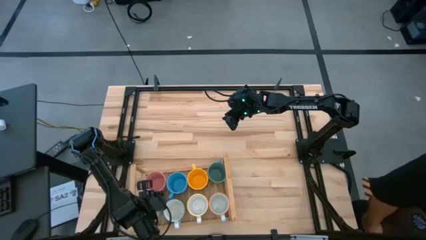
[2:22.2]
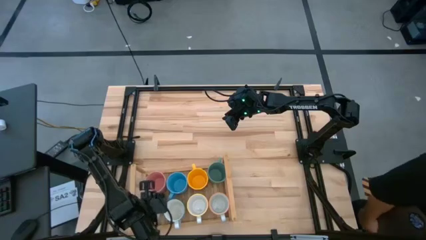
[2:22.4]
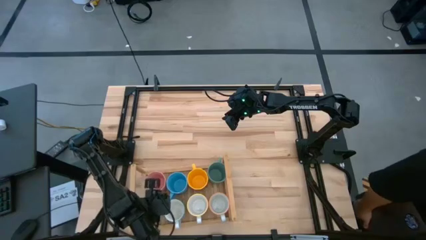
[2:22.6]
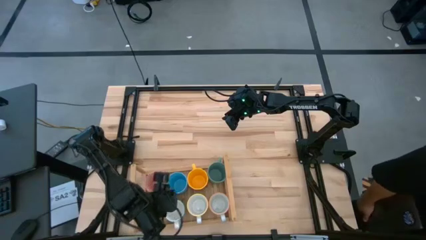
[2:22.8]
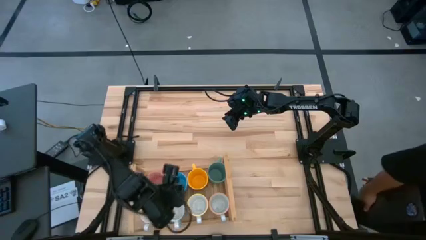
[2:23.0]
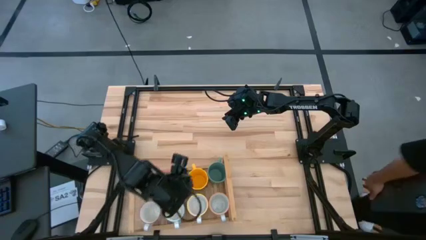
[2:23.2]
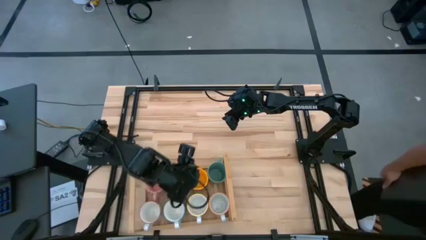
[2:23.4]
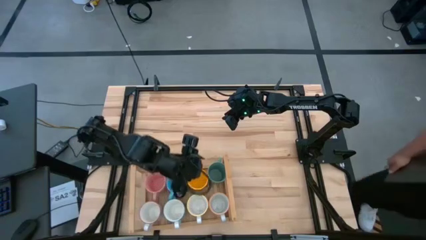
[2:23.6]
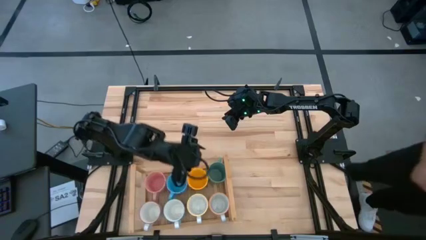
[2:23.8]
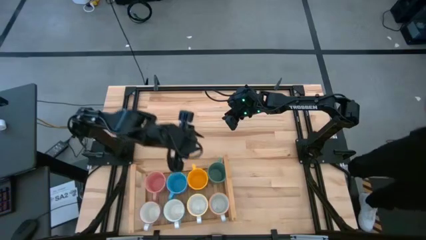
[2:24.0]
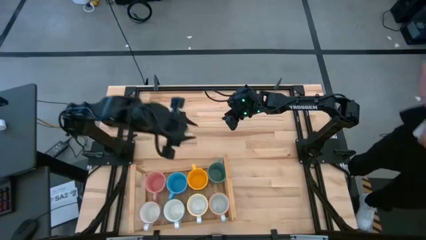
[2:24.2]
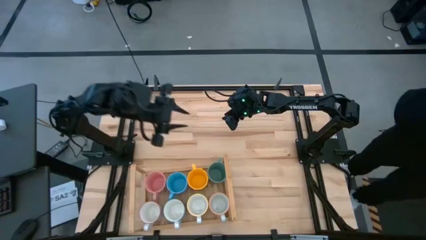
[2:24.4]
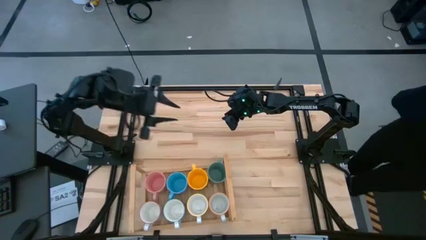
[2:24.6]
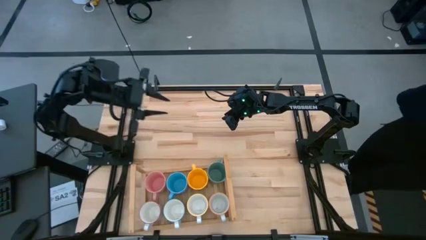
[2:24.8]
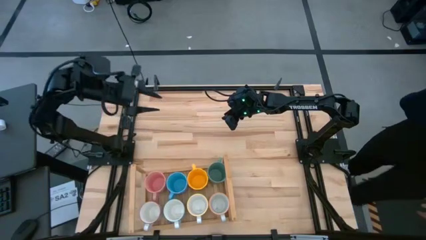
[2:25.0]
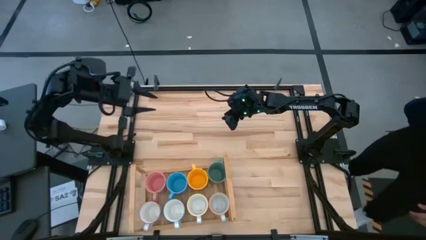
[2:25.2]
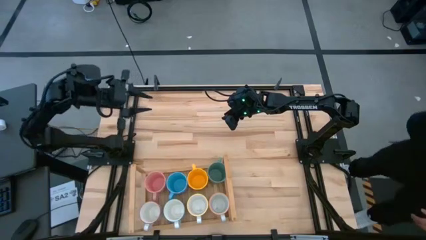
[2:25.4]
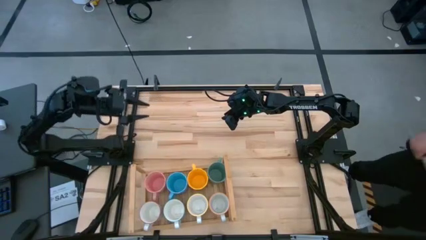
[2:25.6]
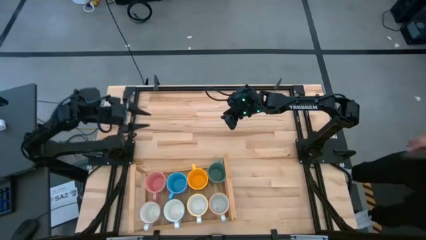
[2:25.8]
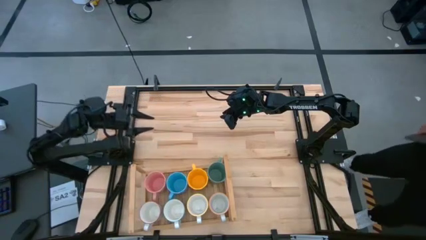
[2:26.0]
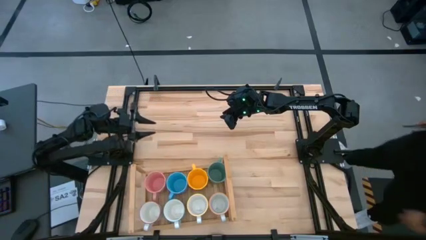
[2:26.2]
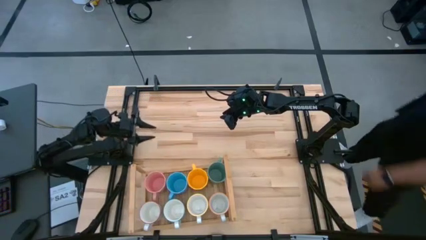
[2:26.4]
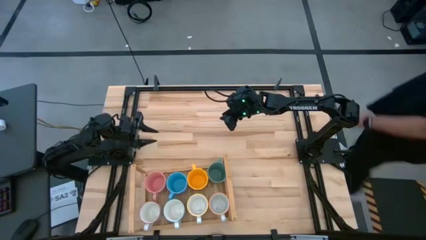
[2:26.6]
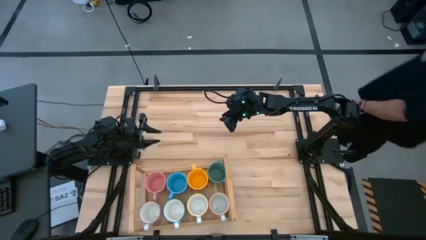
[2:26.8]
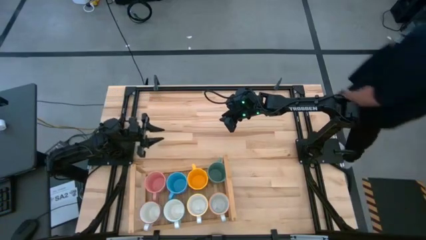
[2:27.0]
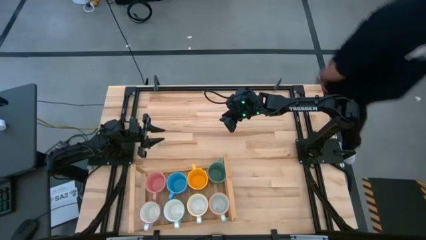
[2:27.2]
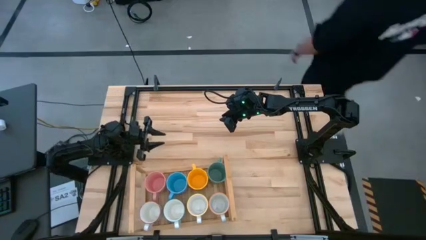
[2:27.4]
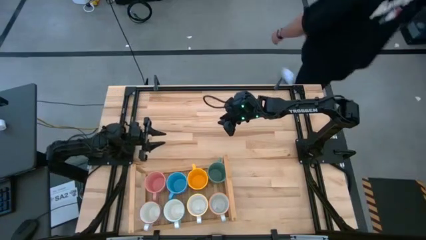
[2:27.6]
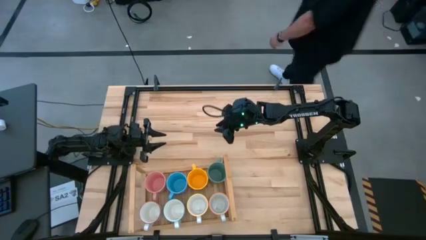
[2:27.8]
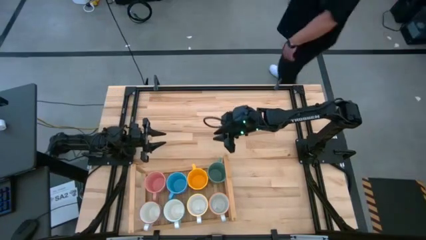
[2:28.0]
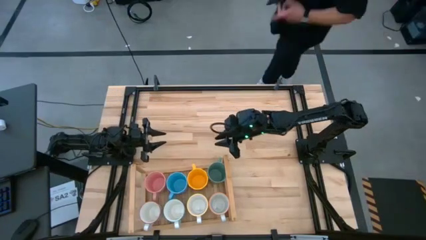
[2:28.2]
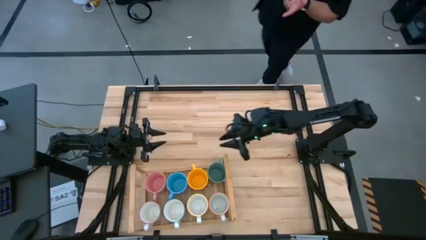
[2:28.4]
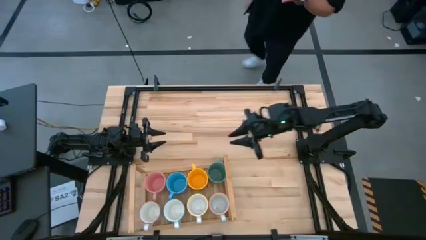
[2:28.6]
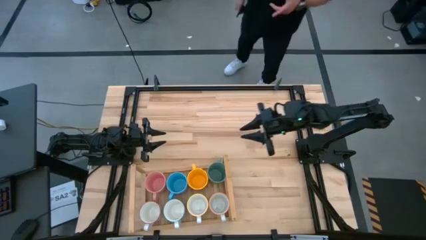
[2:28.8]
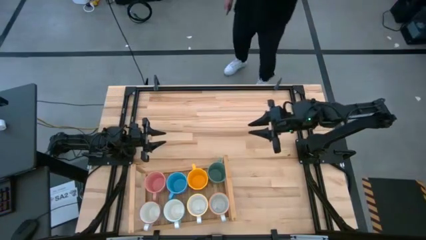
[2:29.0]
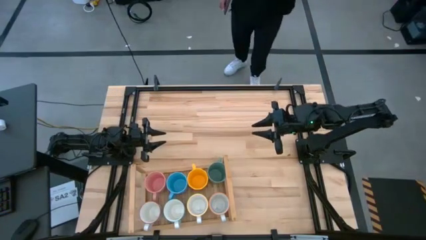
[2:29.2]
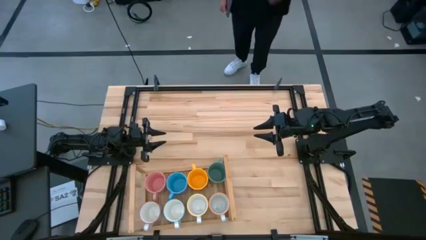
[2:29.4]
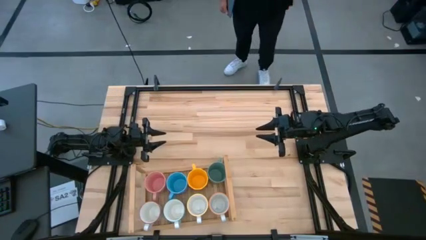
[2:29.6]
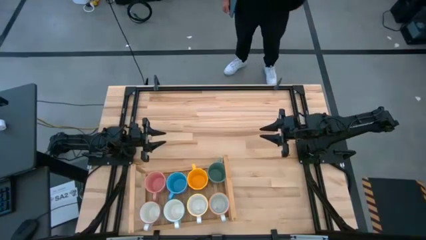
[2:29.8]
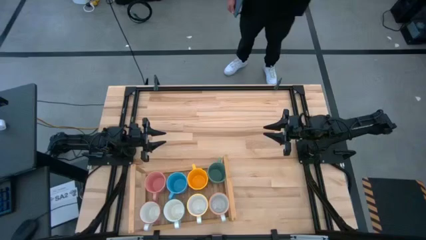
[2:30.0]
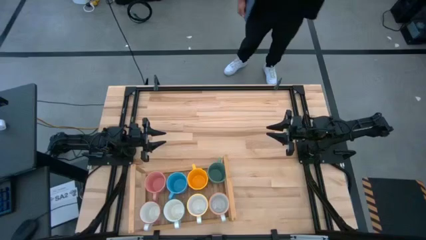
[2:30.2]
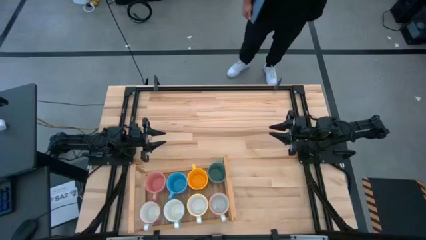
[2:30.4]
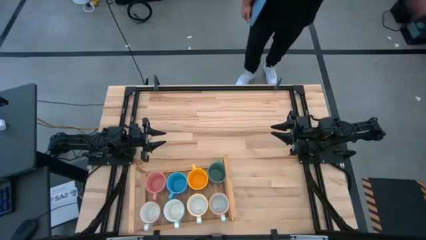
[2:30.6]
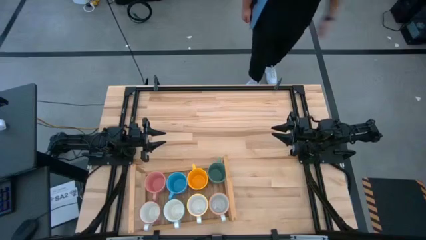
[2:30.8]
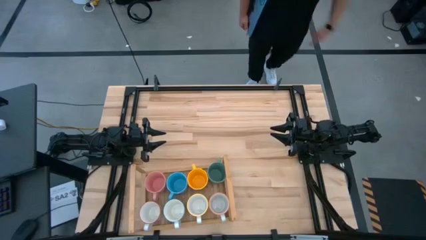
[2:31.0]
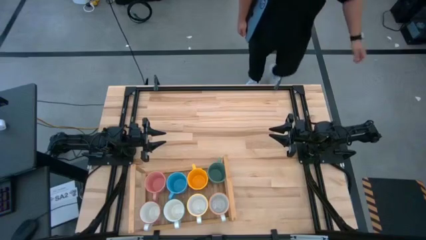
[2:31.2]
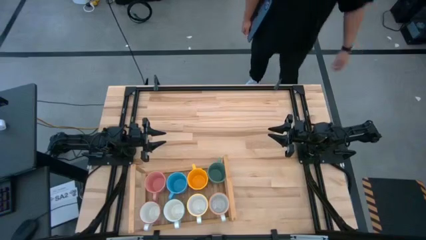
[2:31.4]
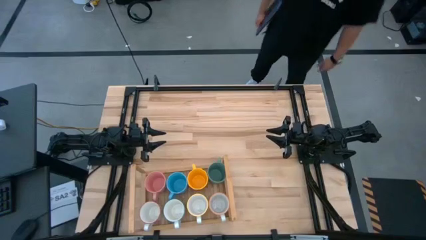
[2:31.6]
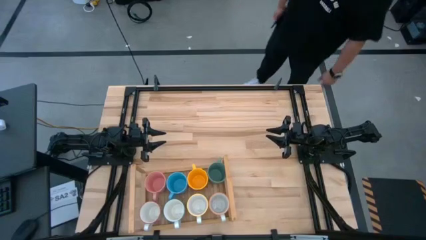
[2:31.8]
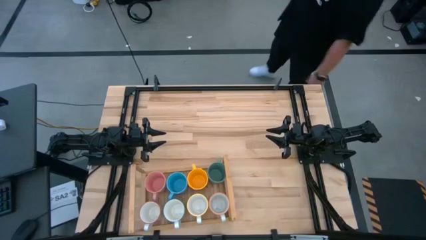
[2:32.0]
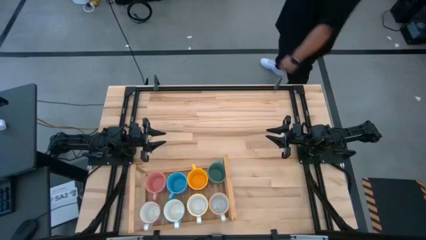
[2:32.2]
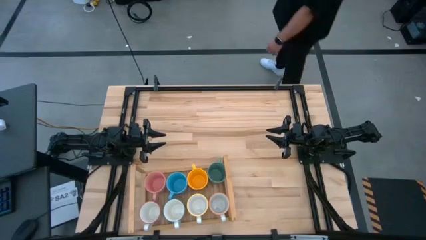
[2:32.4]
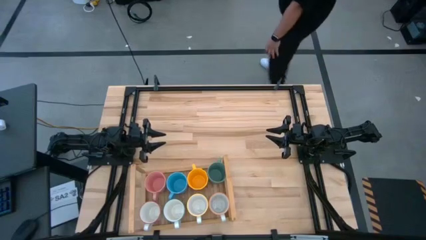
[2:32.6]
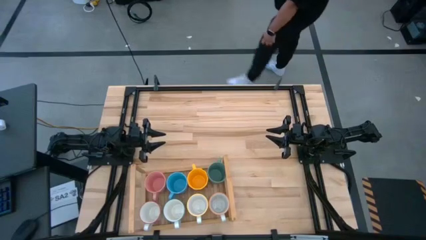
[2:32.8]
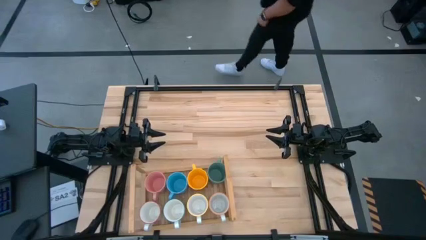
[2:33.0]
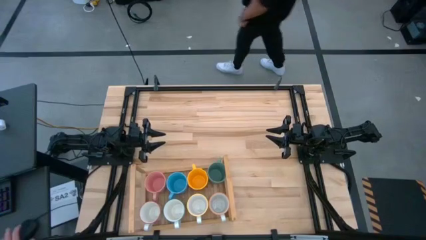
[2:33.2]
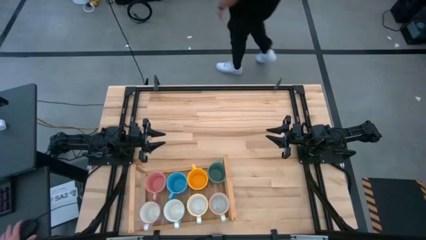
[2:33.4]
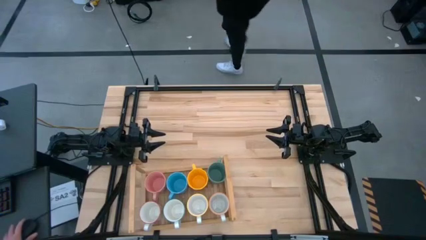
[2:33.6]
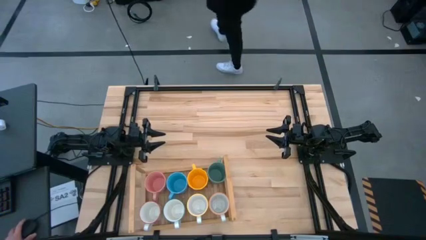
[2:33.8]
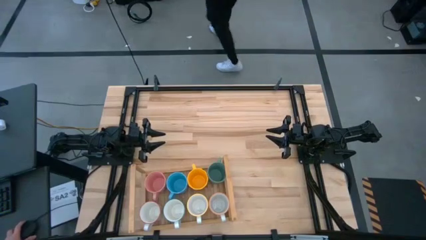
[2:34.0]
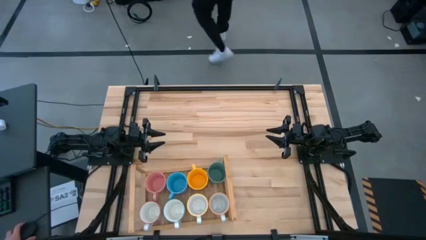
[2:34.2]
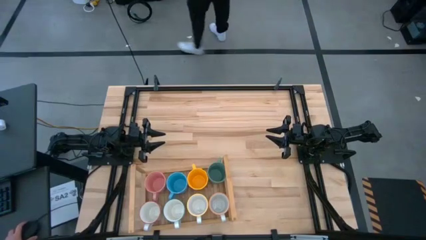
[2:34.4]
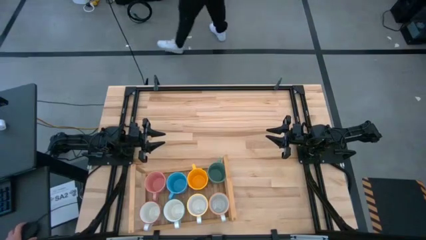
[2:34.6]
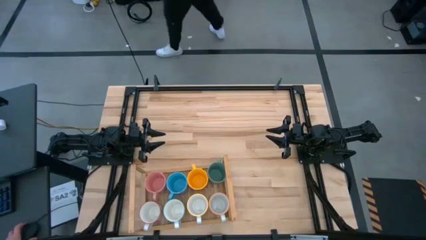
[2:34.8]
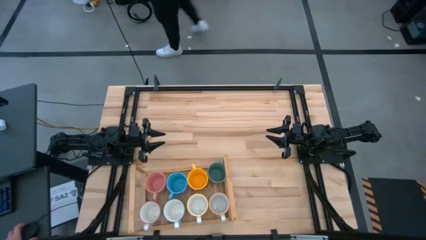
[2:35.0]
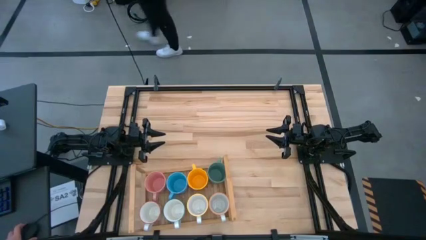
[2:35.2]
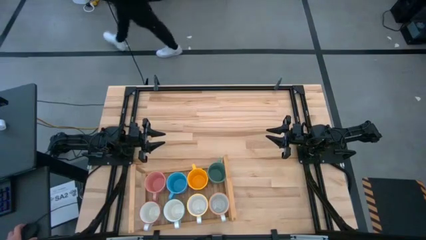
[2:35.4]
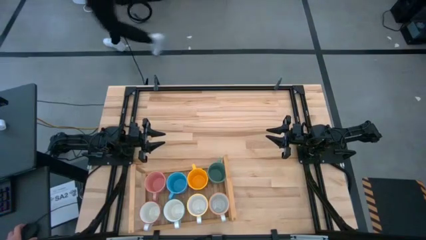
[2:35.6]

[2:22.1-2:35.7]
Task: Place coffee mugs
Return to Home Position
